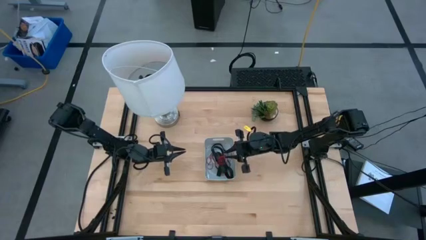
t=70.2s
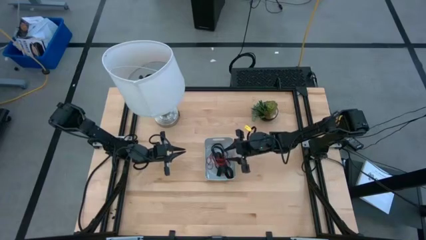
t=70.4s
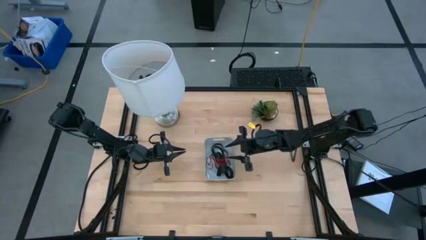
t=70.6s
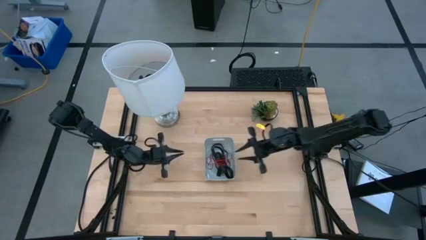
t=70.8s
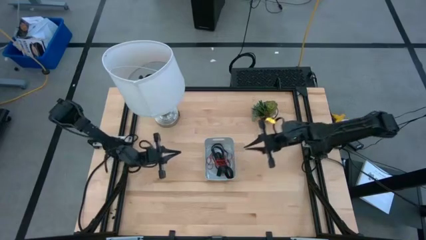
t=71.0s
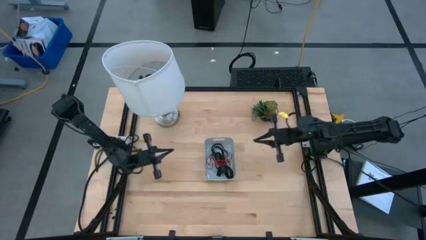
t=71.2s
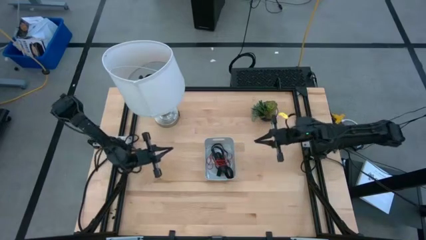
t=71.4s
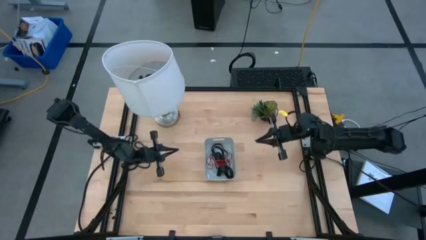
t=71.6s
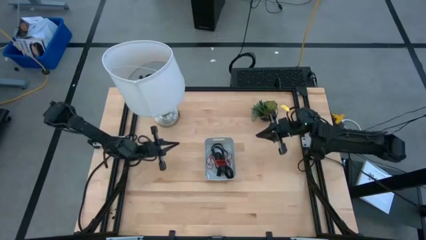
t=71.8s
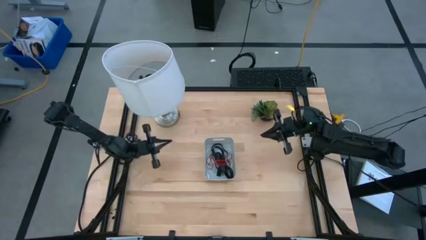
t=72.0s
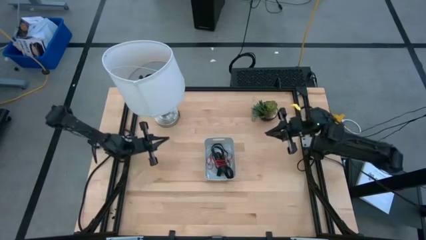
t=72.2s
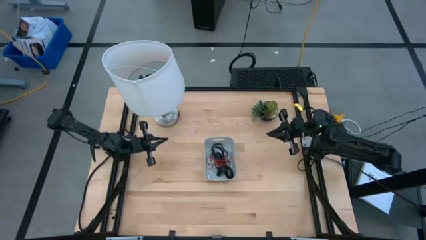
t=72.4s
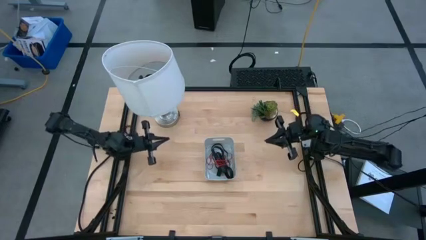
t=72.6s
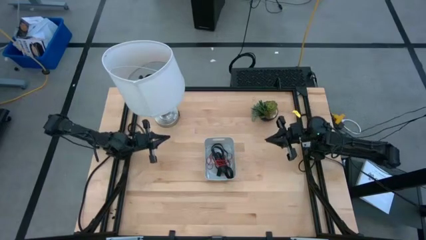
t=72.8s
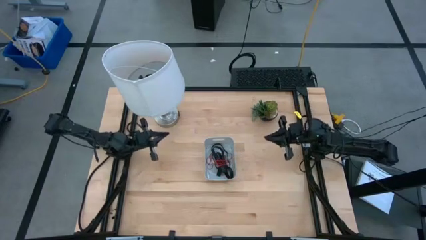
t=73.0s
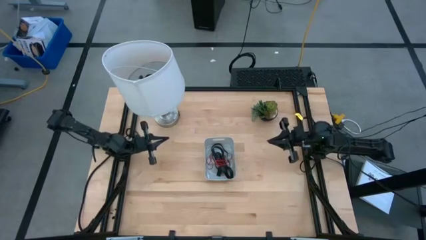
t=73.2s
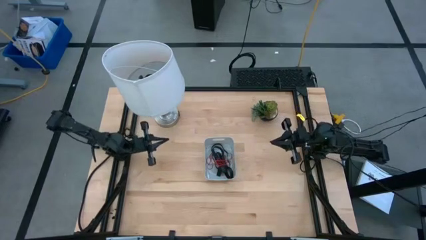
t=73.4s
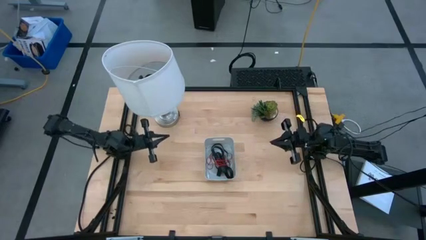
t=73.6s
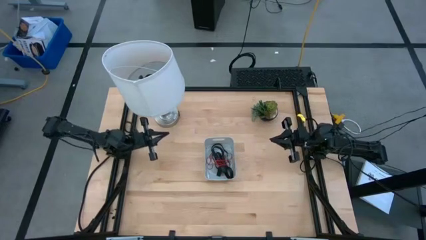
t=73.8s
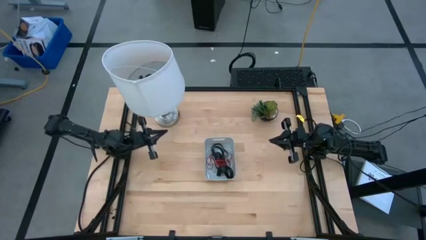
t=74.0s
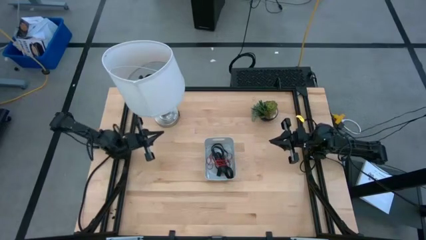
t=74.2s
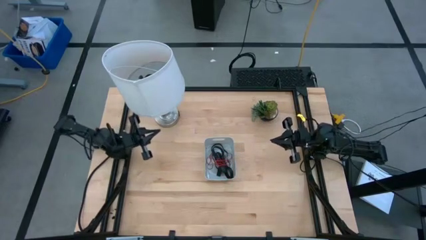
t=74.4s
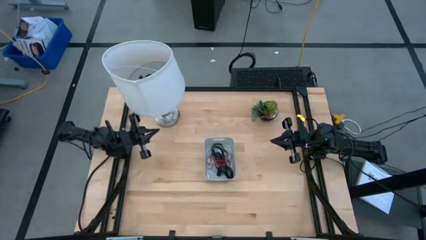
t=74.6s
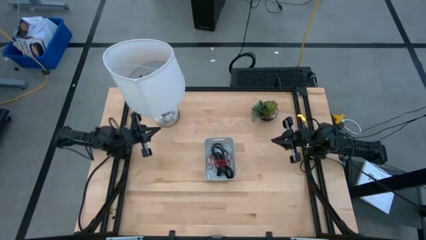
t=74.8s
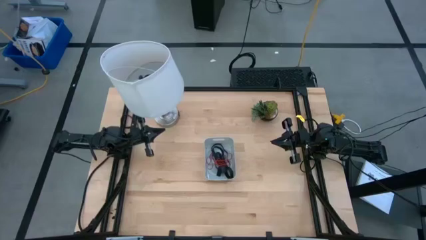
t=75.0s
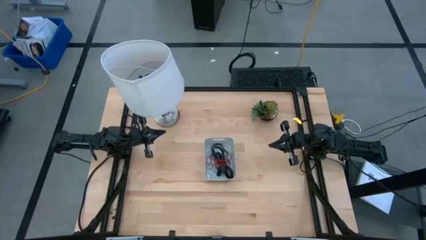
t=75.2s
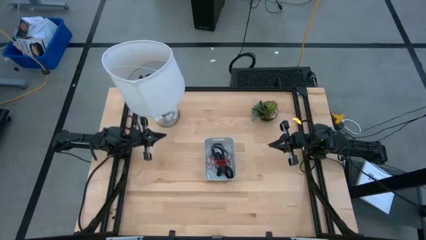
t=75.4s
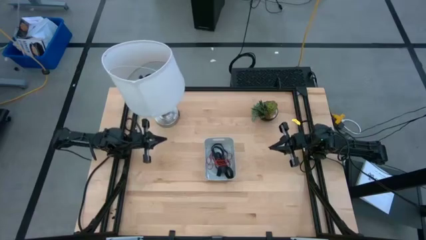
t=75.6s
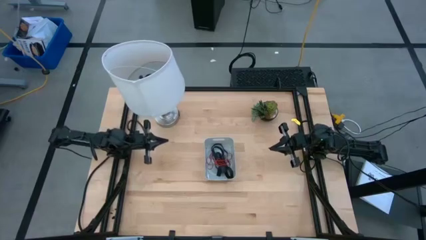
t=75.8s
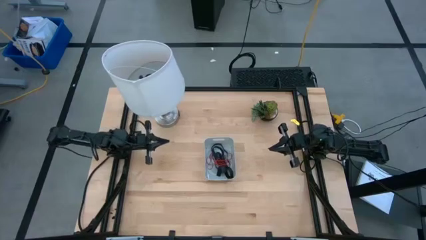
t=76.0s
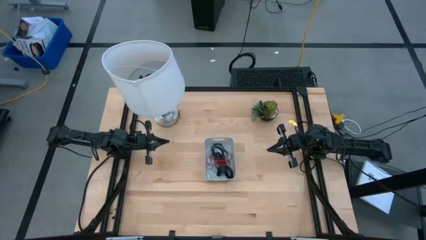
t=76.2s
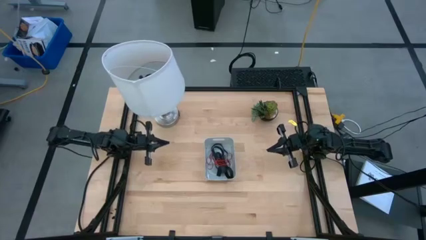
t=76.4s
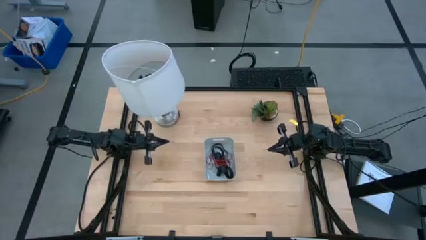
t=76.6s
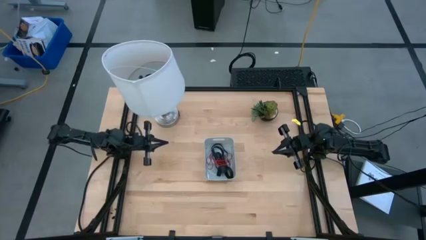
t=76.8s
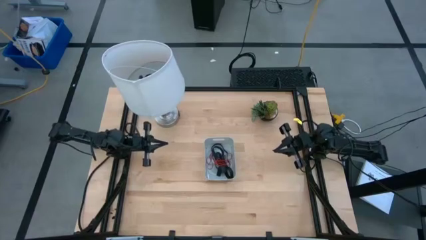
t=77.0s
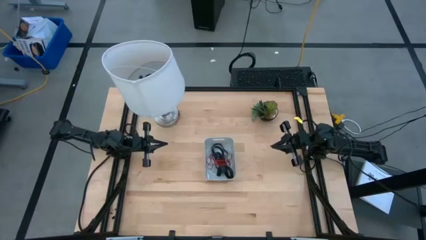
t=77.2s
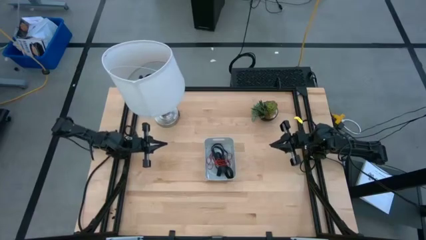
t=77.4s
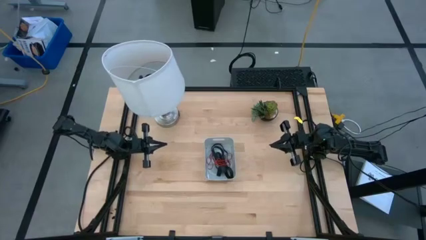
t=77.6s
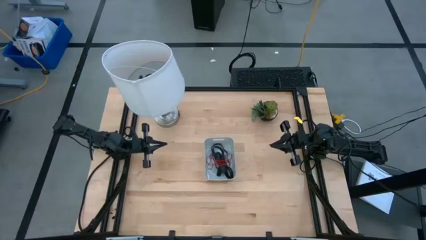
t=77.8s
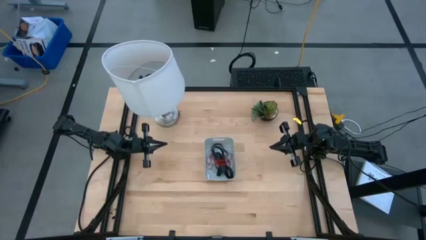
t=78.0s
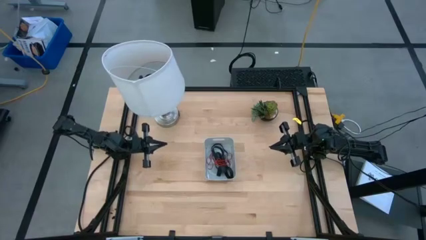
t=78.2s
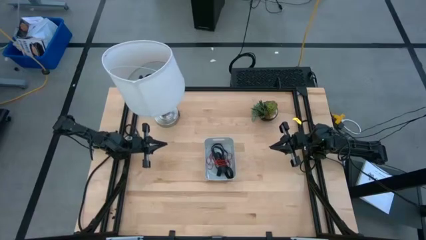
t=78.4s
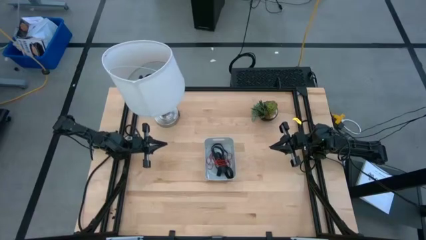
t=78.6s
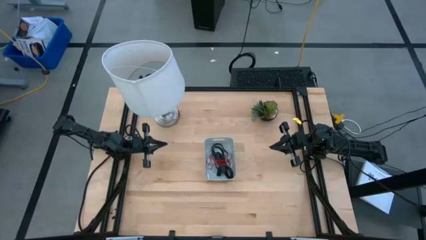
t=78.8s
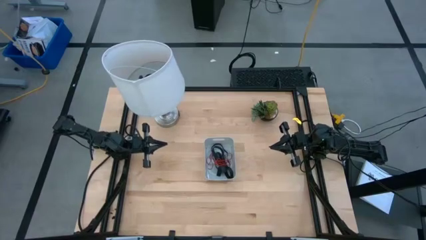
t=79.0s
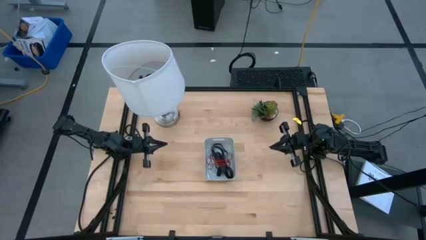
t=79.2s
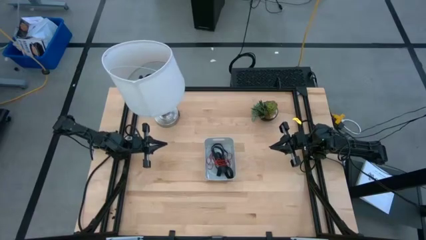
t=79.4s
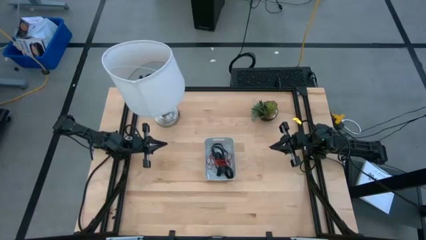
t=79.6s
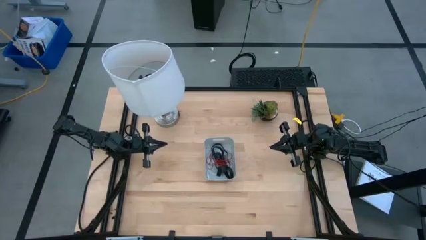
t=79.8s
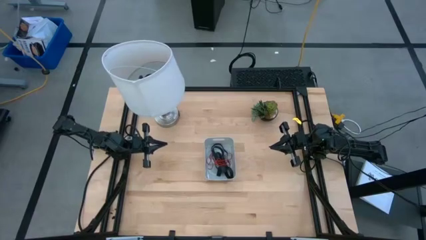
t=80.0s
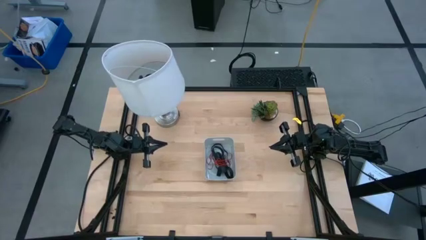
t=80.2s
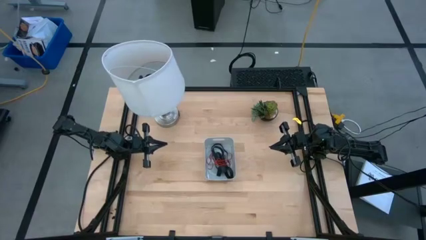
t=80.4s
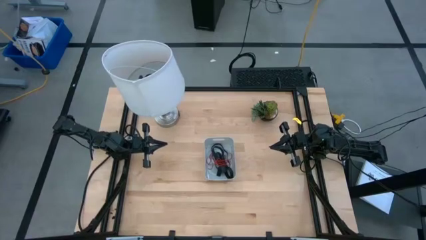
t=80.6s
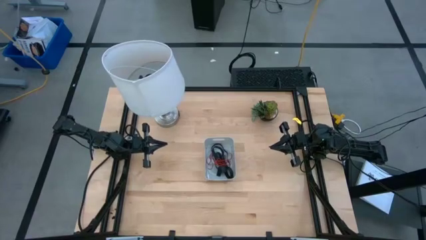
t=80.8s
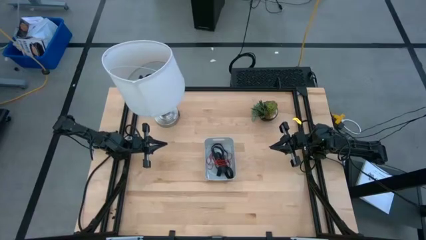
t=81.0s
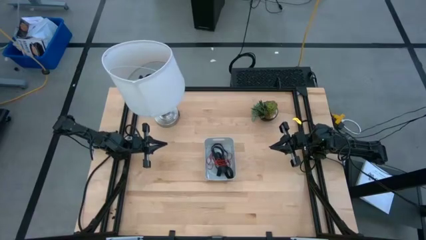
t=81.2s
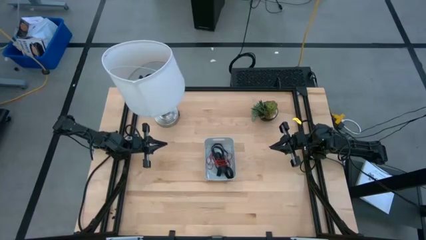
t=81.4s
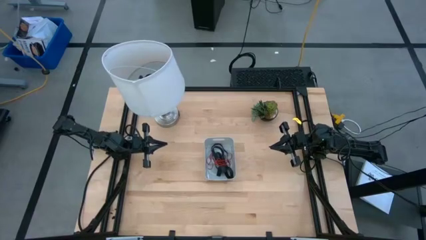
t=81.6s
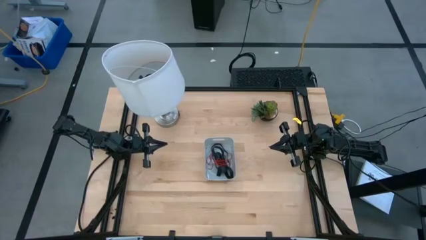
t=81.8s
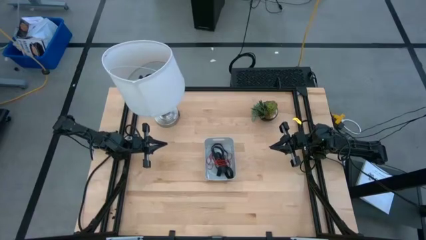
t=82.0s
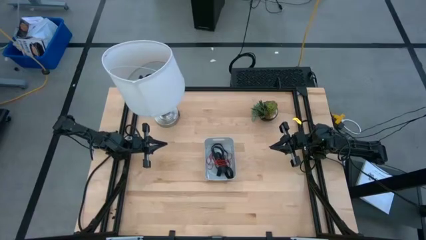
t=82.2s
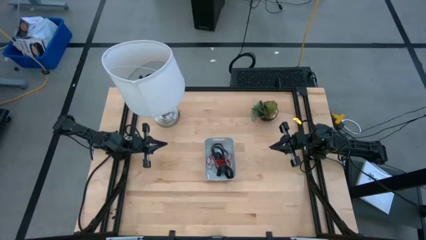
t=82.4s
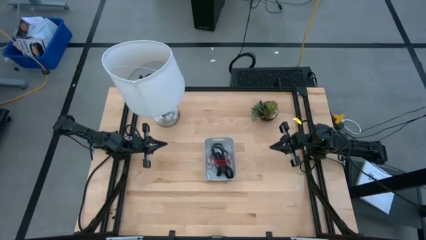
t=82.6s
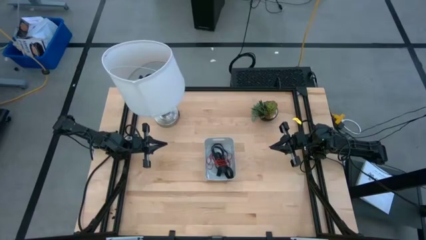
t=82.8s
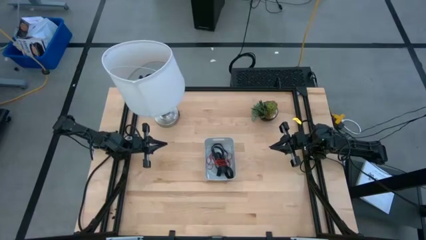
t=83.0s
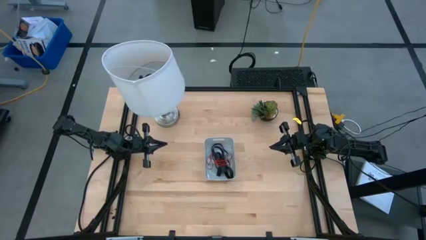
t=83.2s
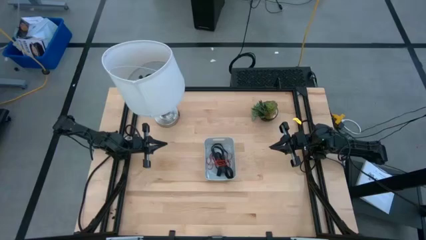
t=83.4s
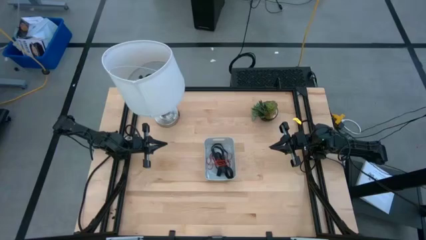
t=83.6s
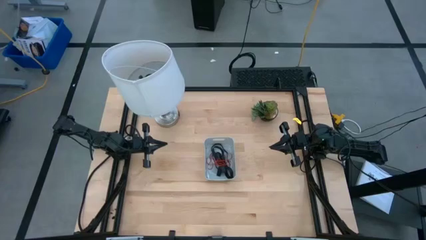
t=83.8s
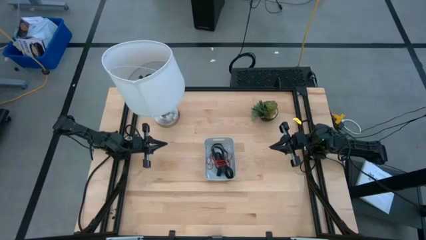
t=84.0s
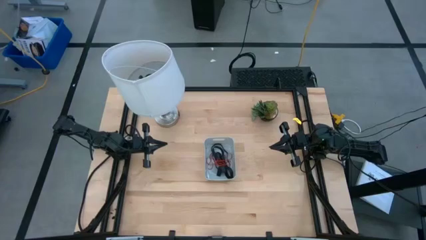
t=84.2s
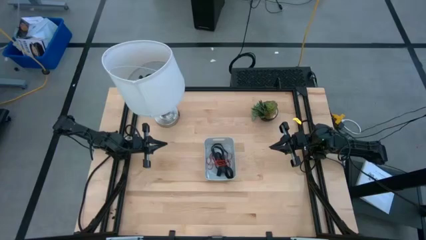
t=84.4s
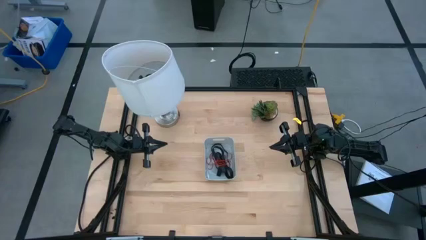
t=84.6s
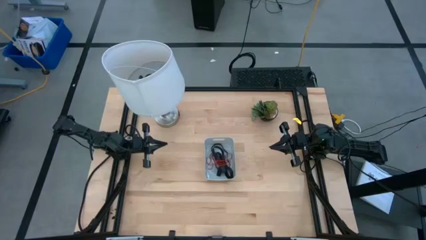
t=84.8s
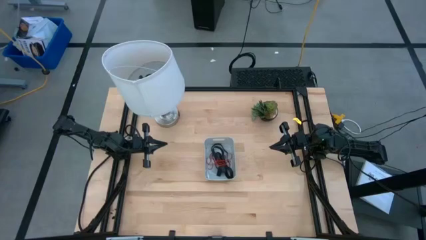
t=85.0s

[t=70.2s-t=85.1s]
Task: Pick and place rubber bands into bin
Return to Home Position

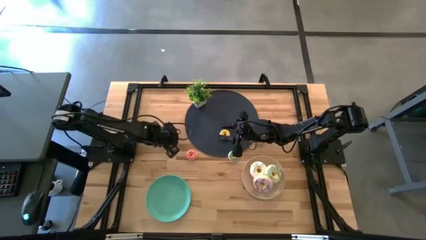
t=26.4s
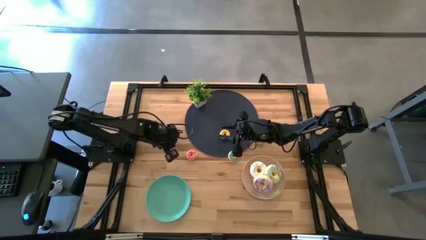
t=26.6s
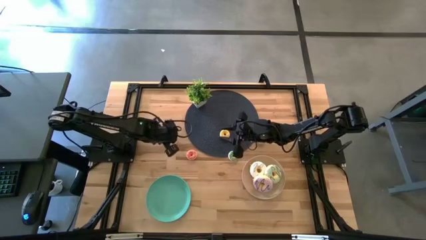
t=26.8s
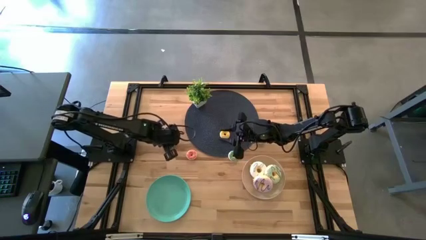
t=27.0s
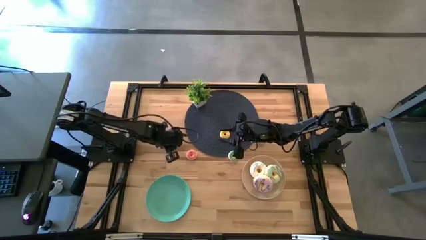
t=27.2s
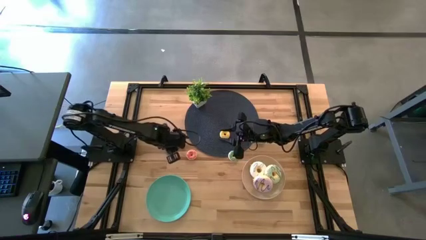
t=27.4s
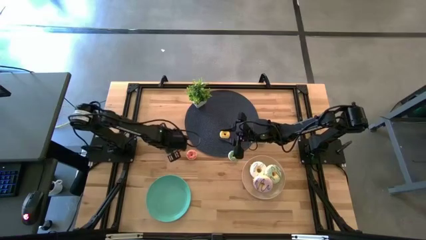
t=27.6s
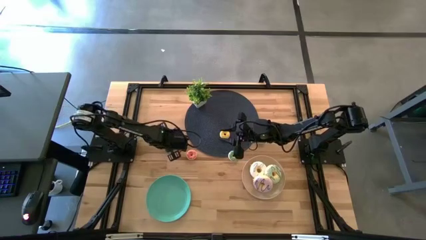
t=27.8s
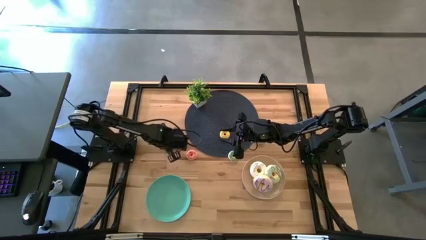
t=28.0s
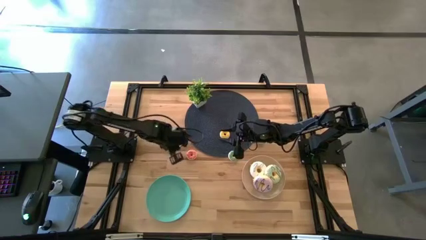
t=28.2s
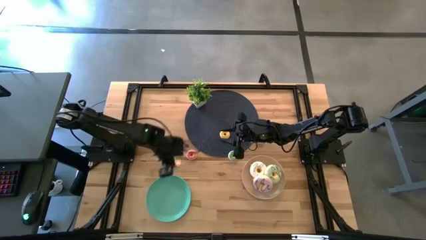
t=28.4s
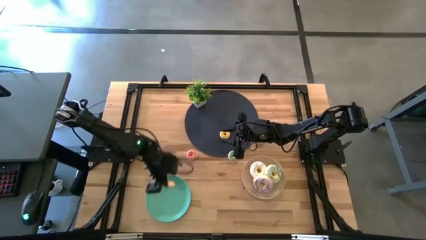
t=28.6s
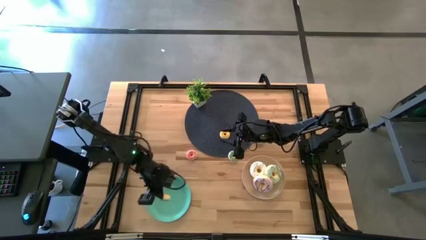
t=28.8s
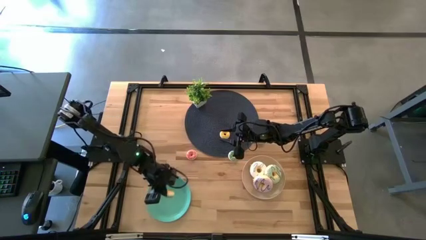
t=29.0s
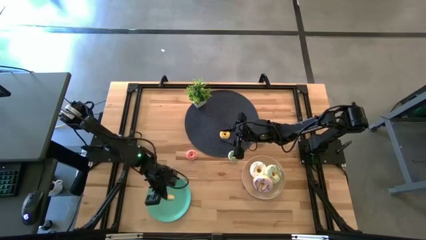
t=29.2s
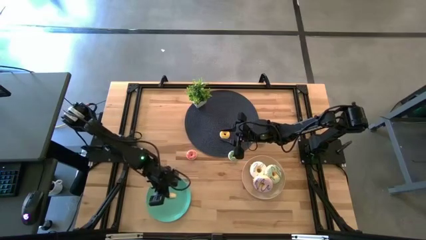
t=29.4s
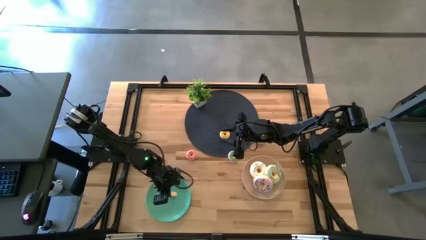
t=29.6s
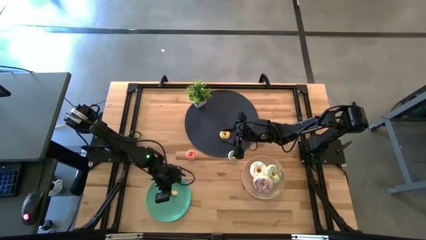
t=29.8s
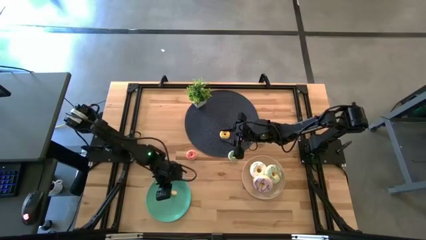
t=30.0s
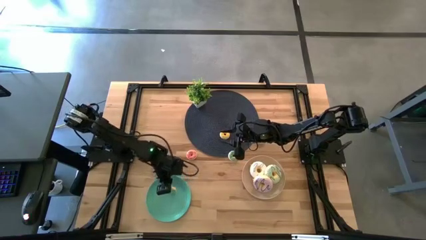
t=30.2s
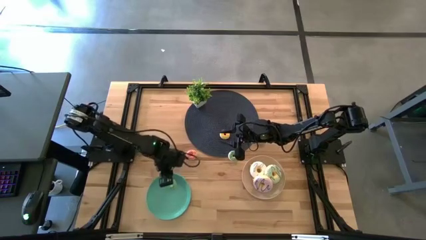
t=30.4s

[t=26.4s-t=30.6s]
Task: Pick & Place donuts
Put the left small green donut on the blue plate
